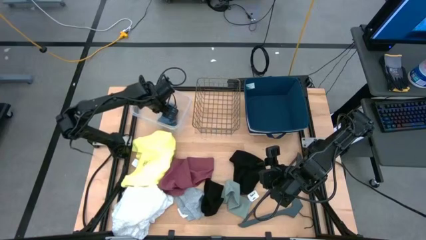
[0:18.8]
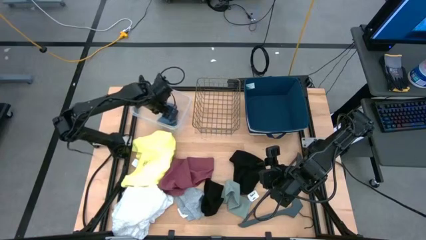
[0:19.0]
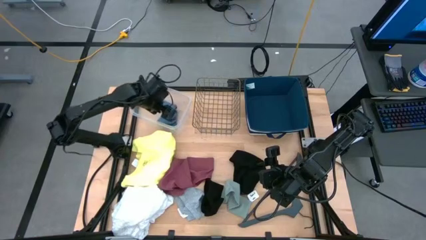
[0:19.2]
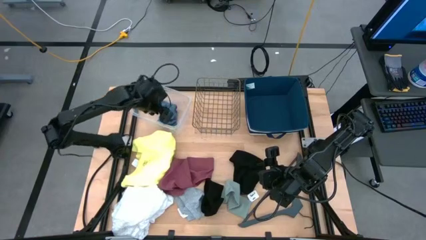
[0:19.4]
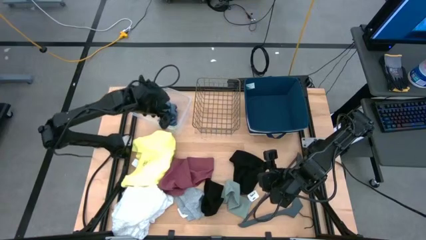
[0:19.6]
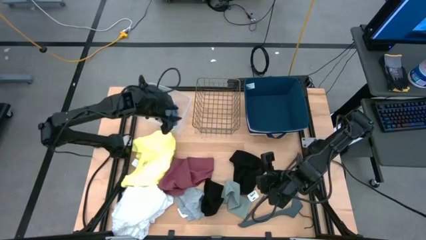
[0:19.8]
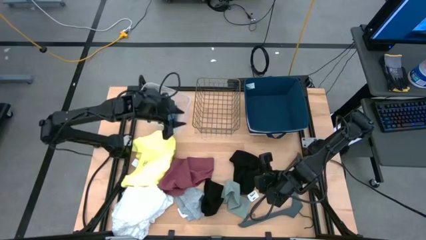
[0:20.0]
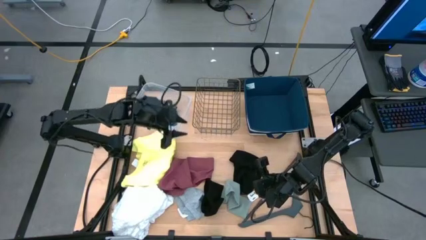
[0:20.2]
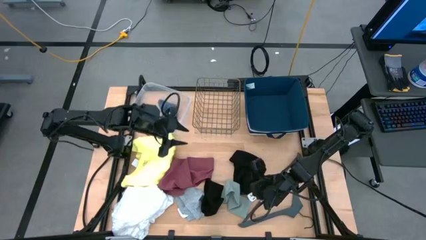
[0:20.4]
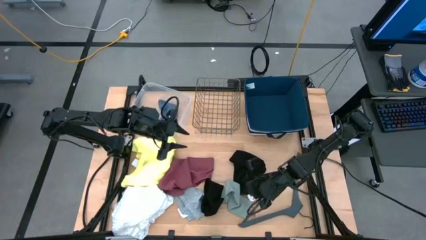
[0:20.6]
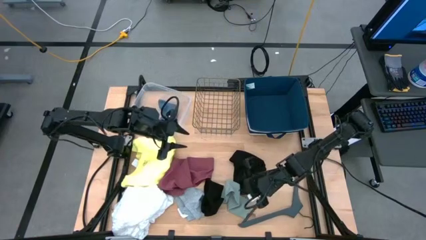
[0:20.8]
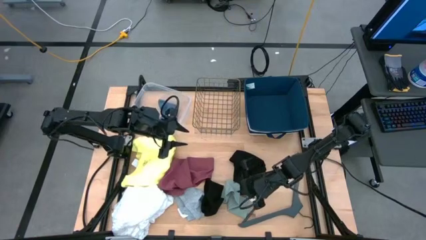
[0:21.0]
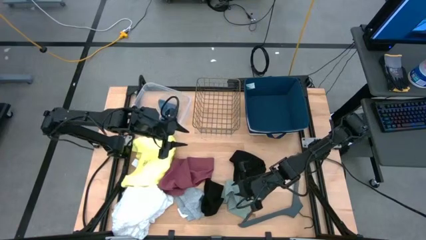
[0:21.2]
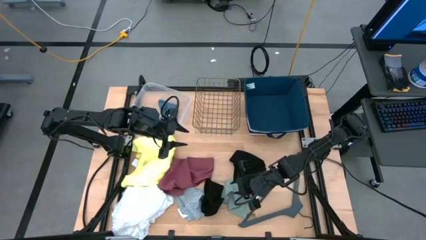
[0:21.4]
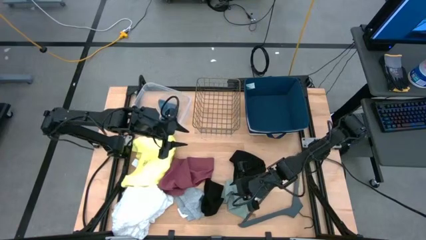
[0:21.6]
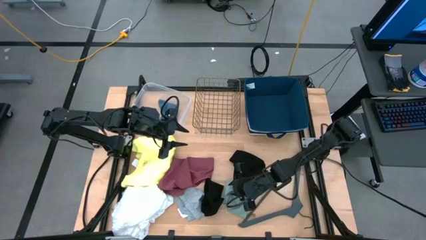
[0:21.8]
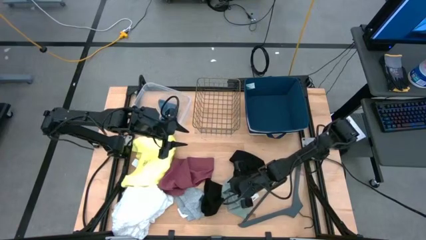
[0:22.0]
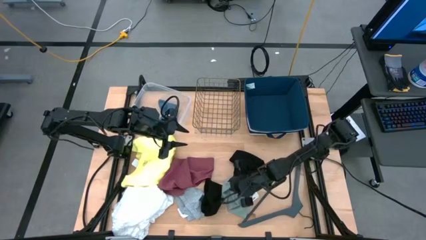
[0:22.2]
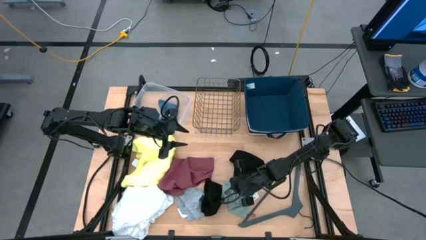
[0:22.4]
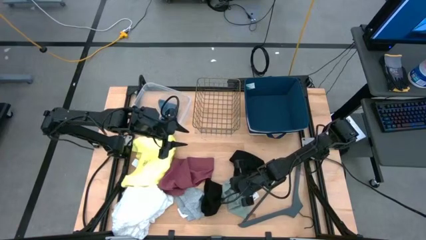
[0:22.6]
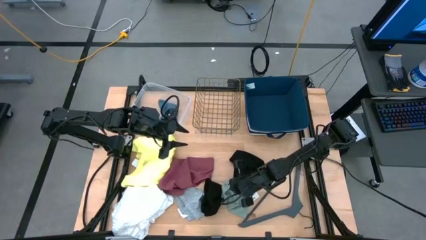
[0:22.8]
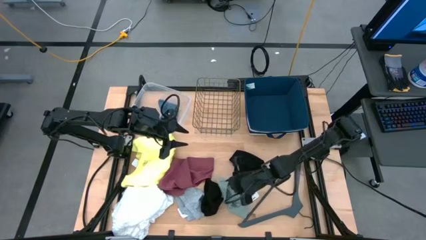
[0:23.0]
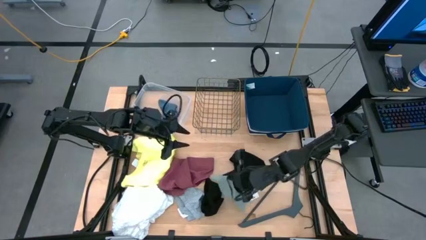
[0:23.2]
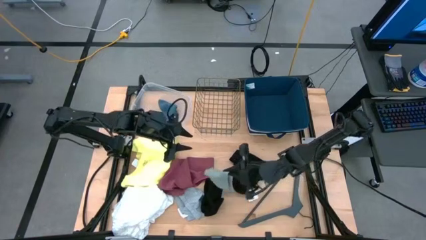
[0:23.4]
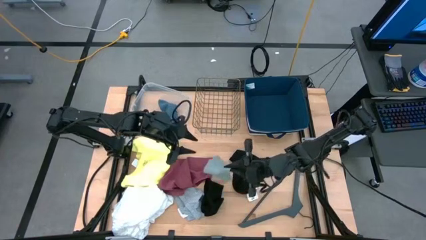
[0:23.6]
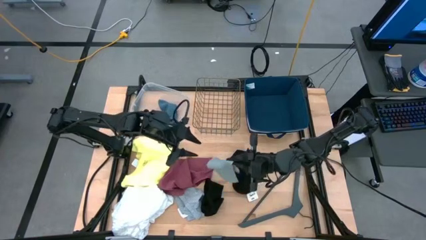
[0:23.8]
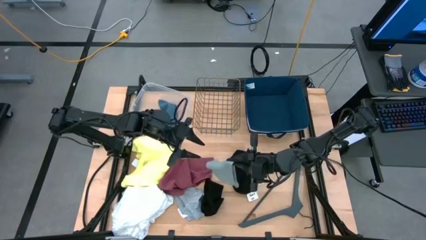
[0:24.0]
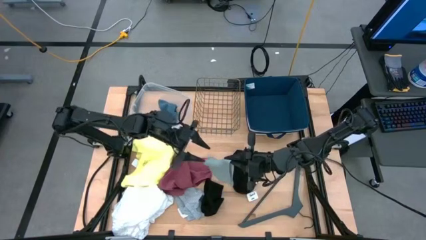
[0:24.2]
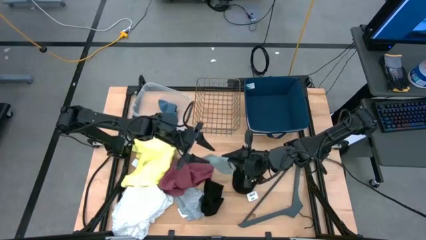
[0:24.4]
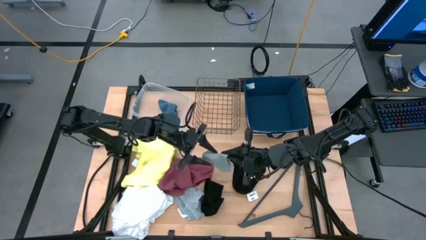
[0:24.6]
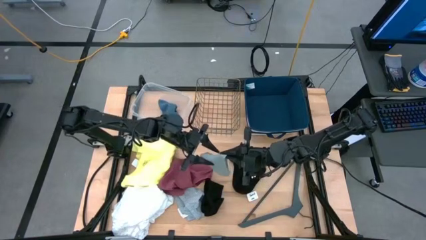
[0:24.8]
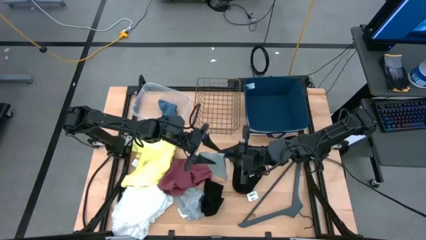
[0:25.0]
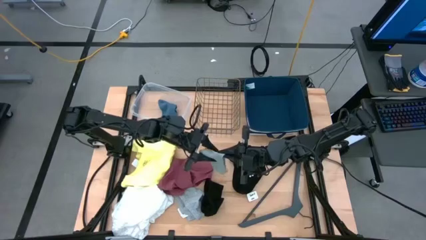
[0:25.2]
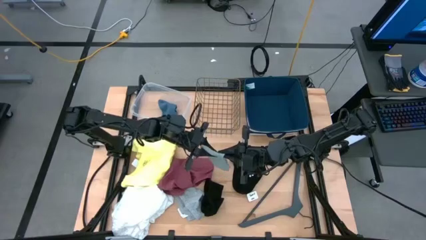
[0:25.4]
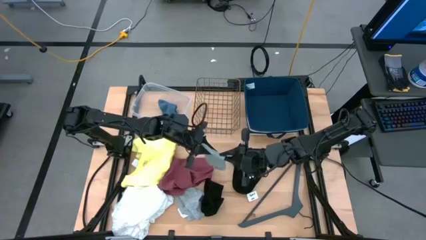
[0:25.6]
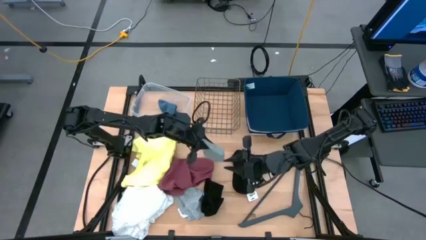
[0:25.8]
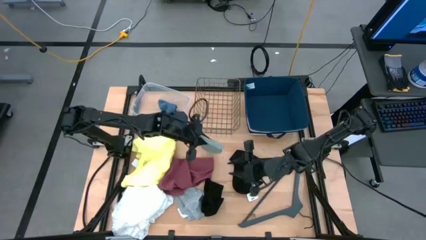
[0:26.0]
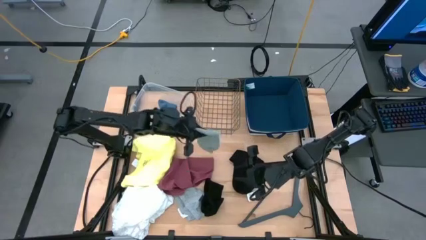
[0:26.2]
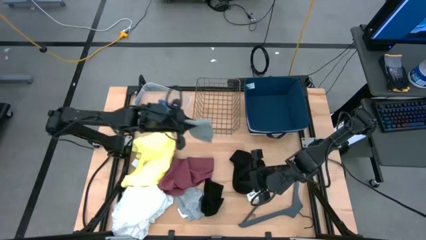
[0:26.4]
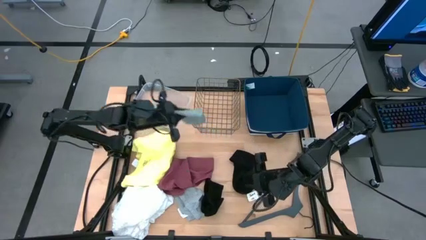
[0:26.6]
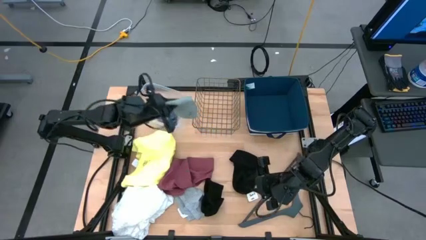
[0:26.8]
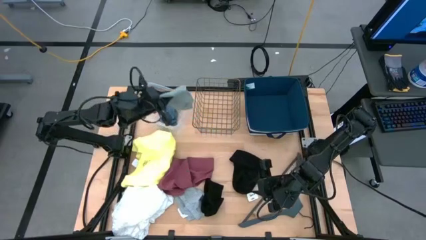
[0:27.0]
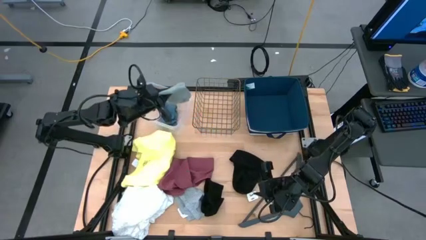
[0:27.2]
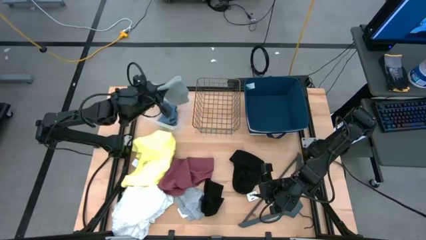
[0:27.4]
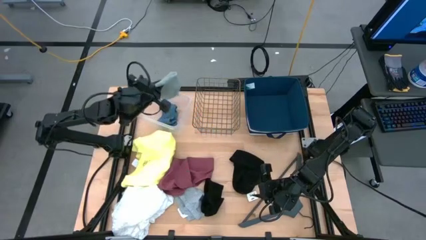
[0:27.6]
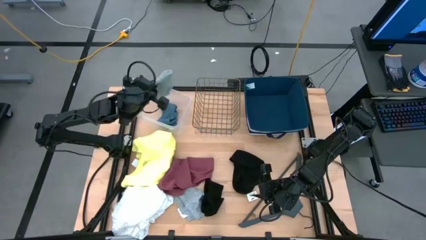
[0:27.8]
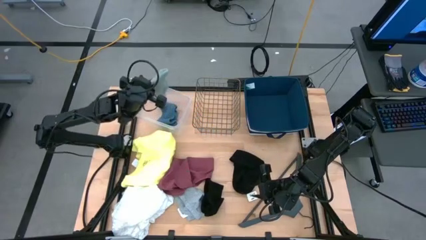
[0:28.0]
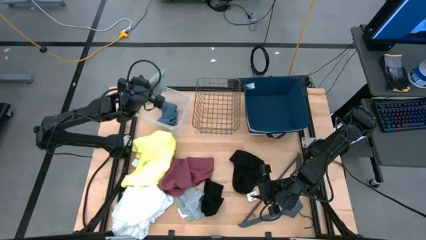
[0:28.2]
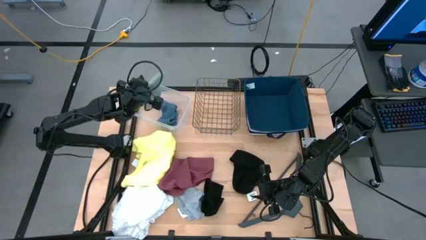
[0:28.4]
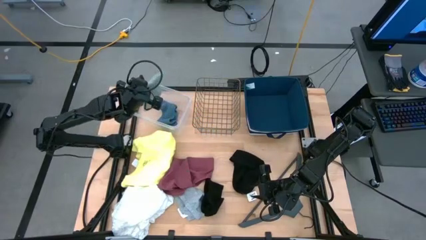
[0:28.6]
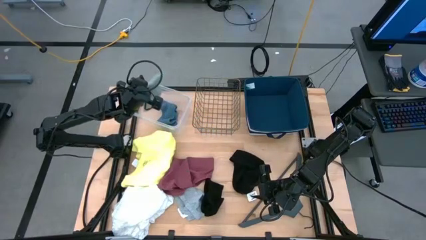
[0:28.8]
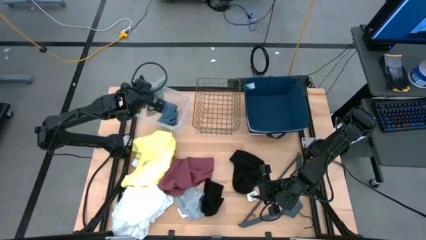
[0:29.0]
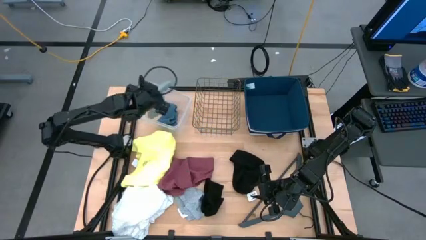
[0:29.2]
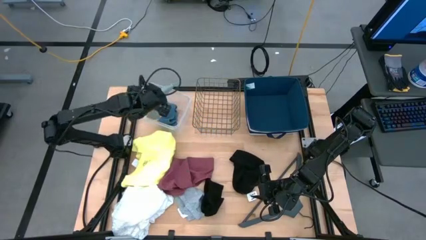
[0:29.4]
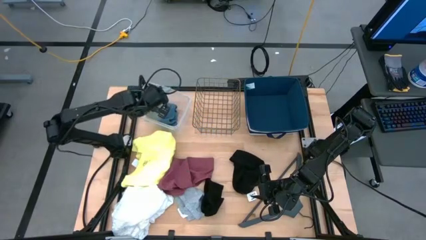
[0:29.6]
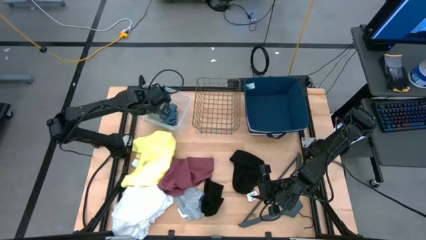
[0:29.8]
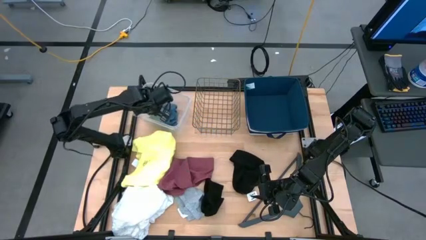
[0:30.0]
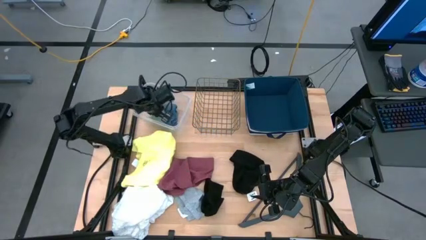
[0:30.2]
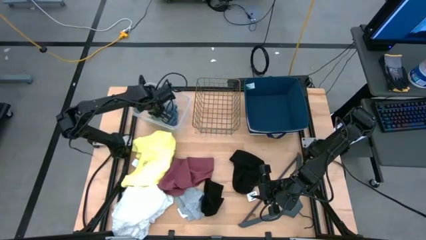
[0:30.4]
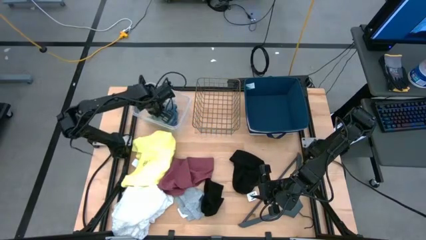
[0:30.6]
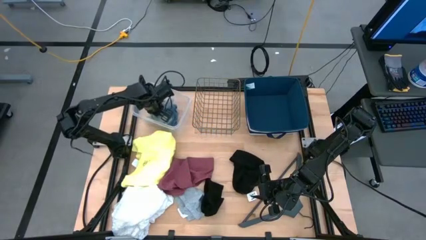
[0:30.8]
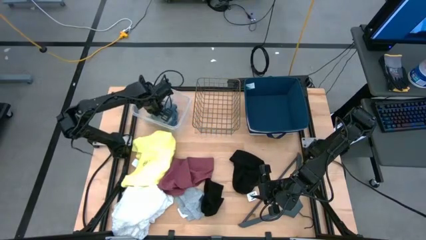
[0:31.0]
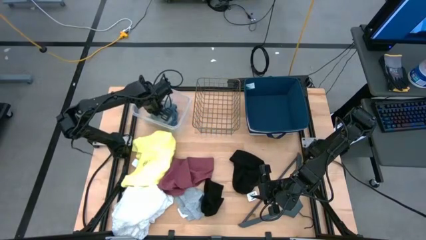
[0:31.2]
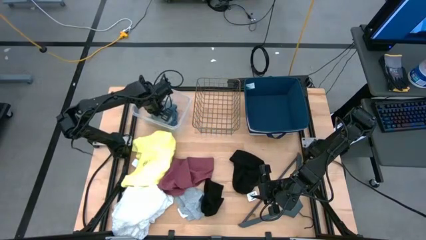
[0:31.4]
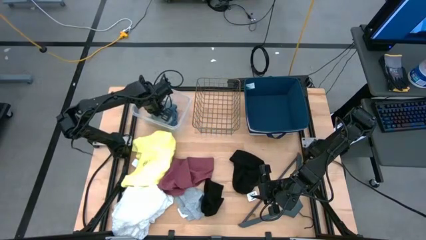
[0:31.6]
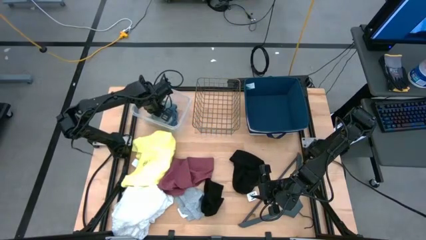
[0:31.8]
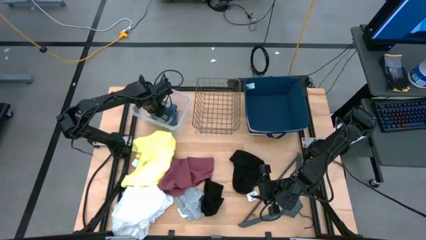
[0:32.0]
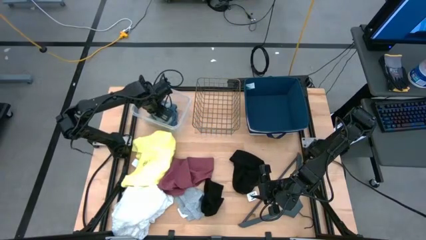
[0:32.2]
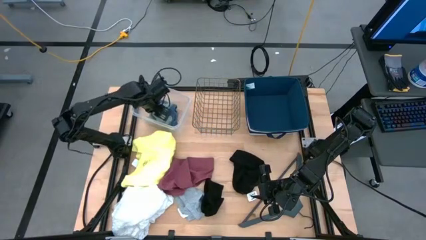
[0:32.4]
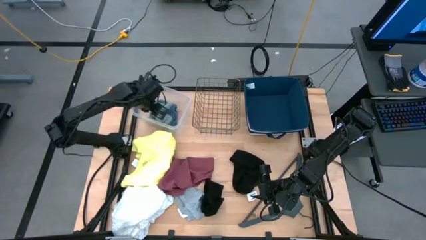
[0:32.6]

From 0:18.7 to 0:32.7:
Task: Pick & Place Cloths
Put the gray sock into the transparent bin
